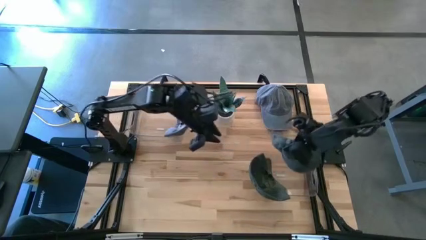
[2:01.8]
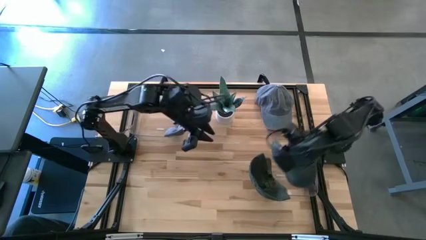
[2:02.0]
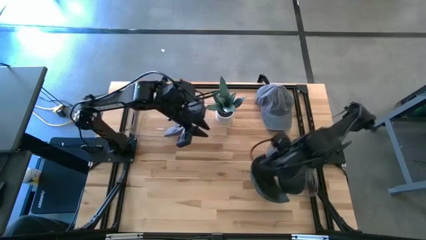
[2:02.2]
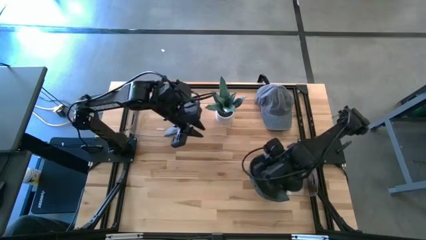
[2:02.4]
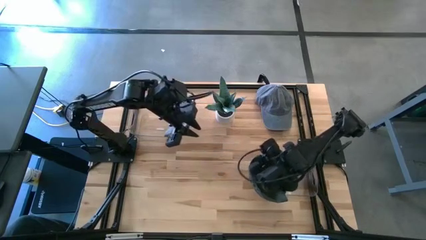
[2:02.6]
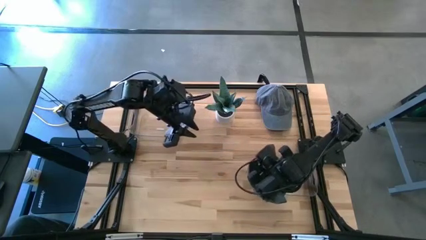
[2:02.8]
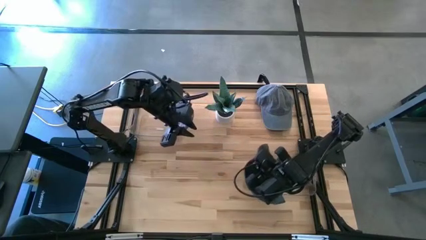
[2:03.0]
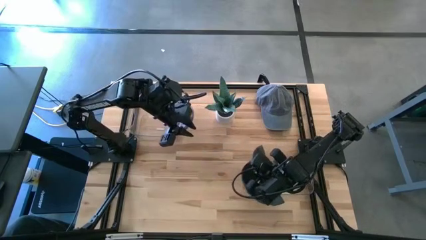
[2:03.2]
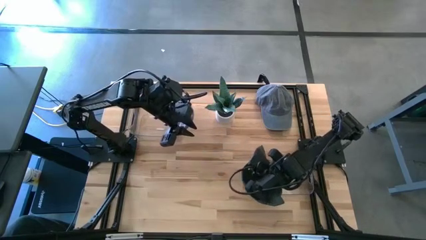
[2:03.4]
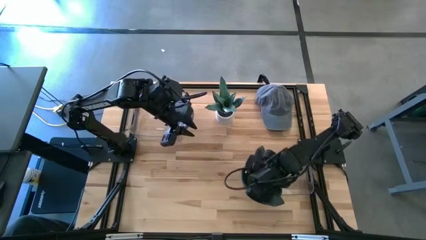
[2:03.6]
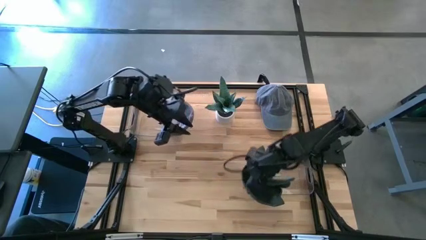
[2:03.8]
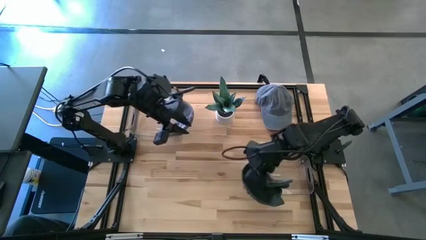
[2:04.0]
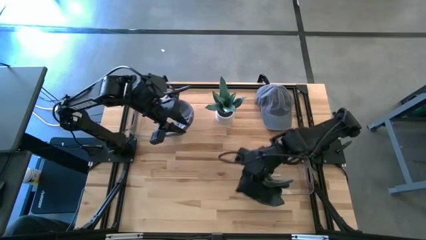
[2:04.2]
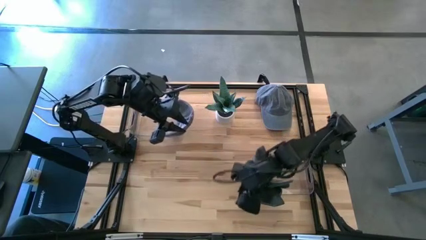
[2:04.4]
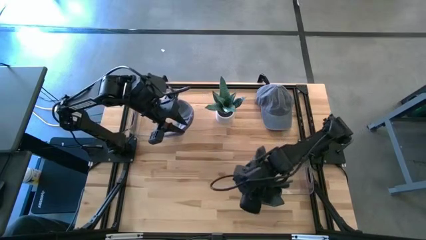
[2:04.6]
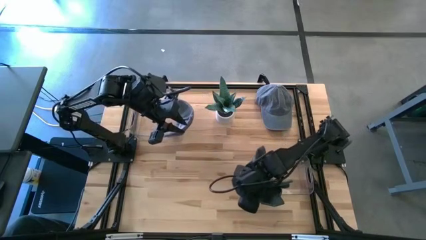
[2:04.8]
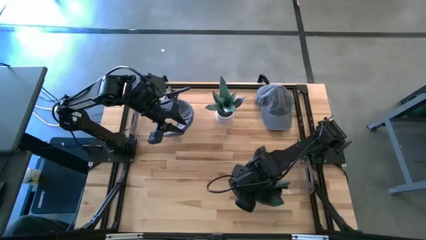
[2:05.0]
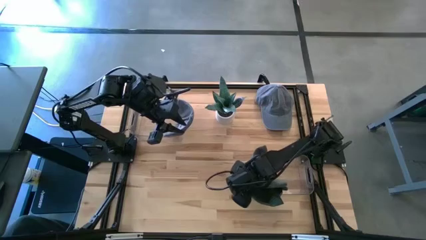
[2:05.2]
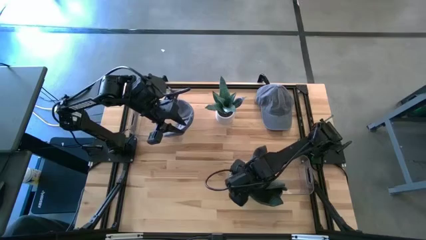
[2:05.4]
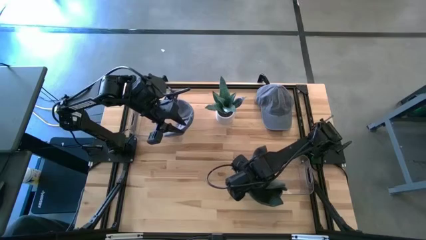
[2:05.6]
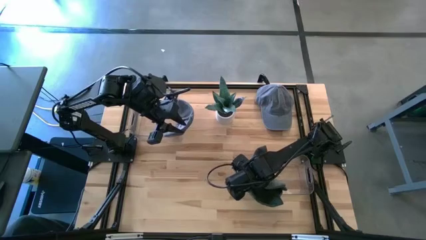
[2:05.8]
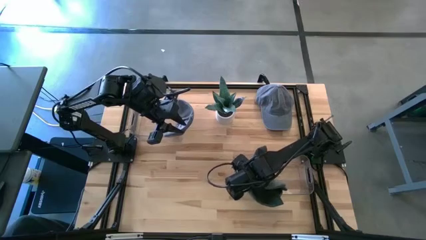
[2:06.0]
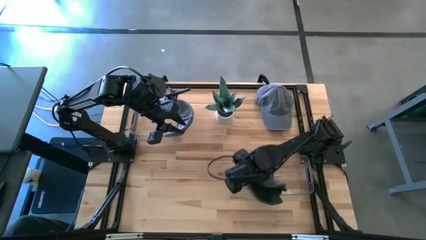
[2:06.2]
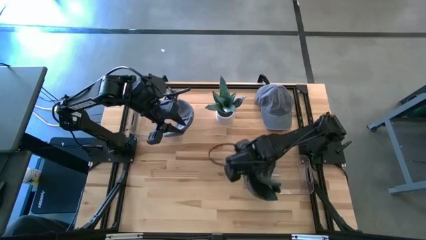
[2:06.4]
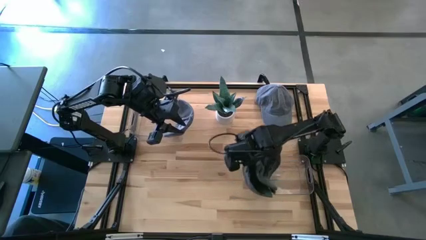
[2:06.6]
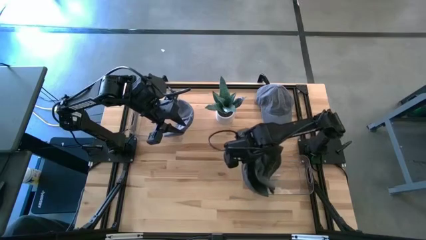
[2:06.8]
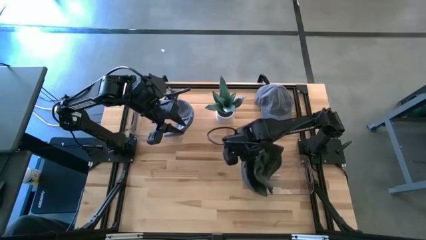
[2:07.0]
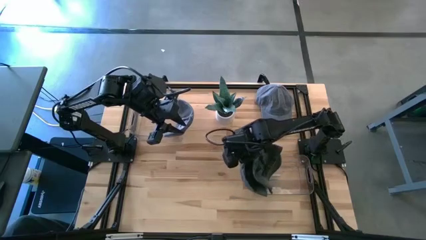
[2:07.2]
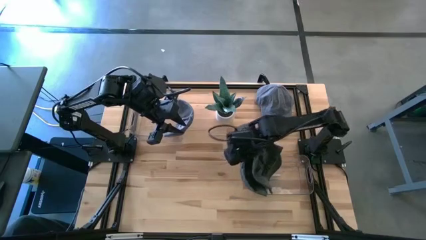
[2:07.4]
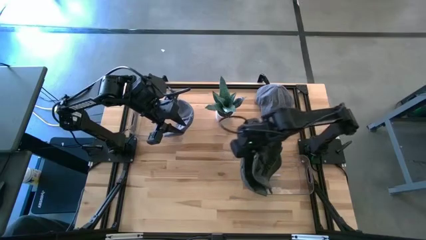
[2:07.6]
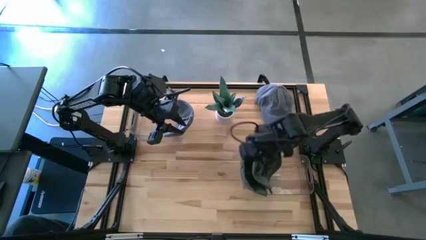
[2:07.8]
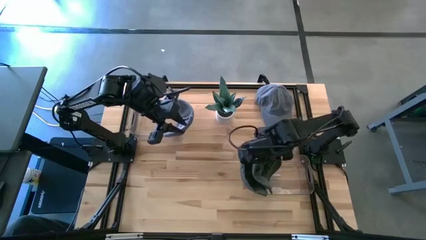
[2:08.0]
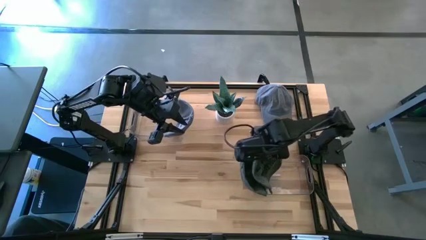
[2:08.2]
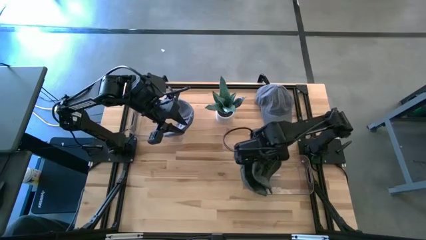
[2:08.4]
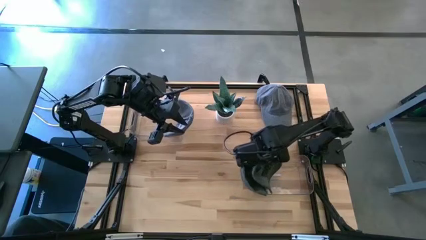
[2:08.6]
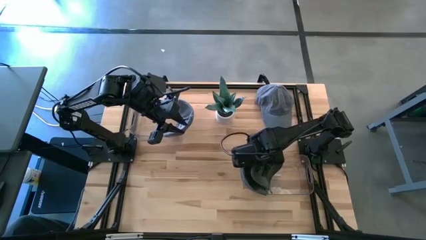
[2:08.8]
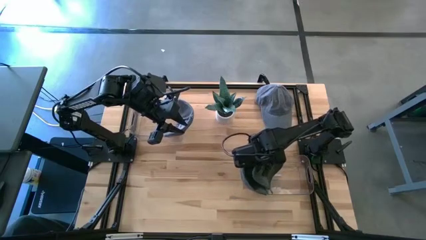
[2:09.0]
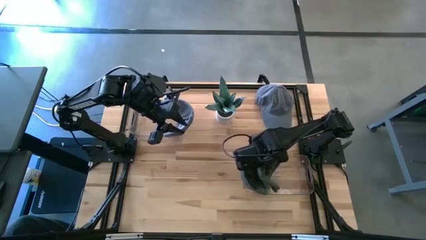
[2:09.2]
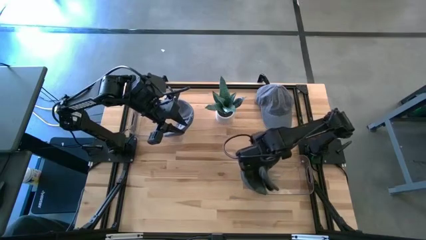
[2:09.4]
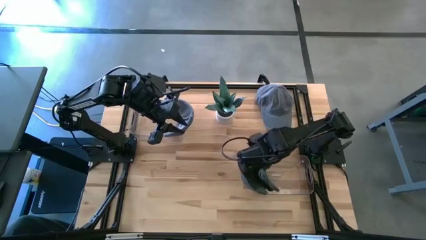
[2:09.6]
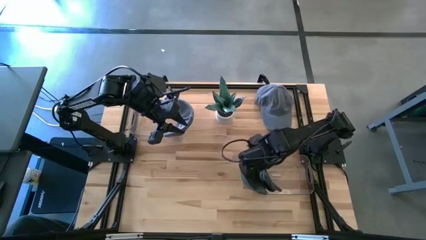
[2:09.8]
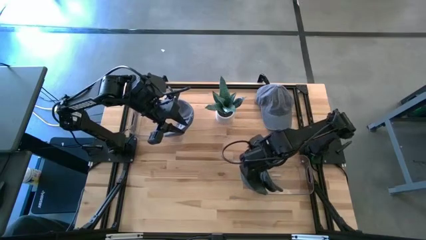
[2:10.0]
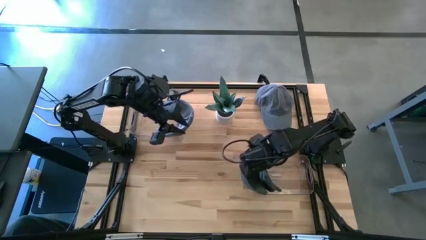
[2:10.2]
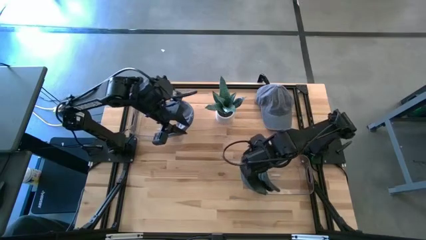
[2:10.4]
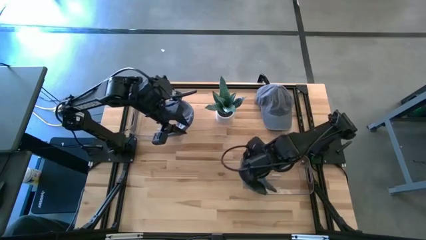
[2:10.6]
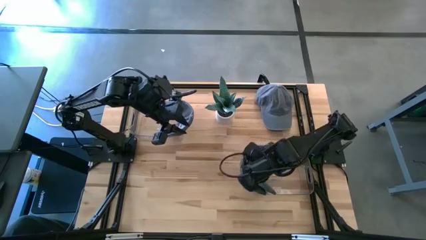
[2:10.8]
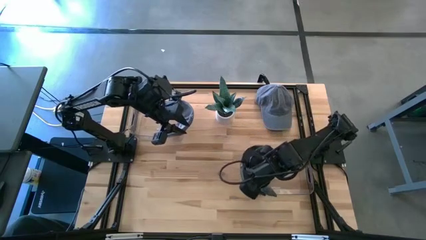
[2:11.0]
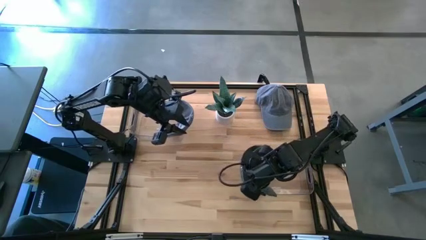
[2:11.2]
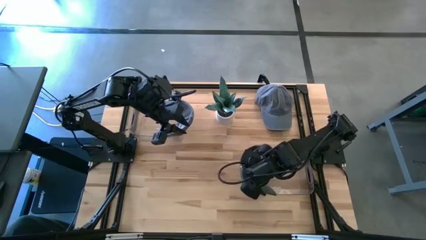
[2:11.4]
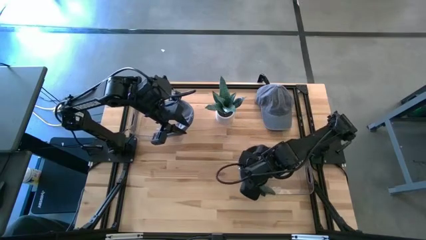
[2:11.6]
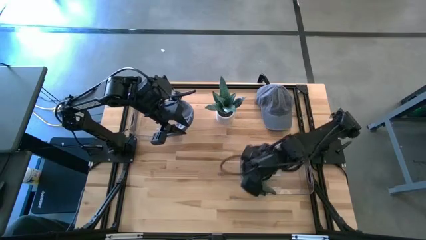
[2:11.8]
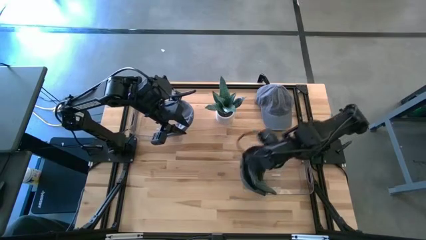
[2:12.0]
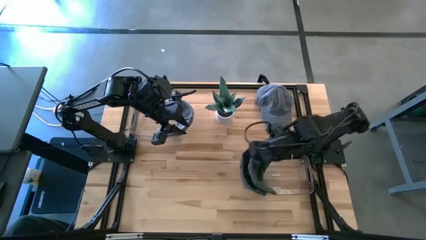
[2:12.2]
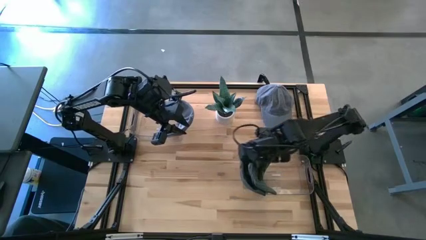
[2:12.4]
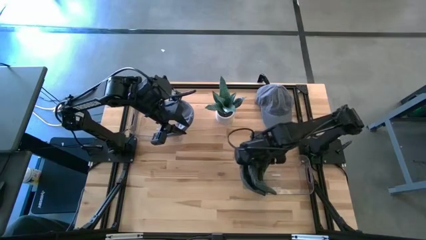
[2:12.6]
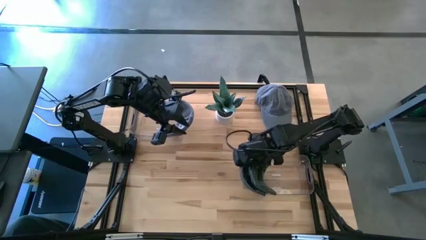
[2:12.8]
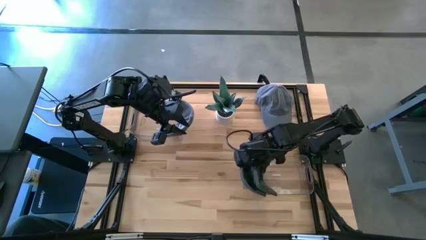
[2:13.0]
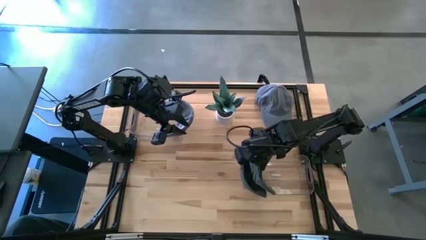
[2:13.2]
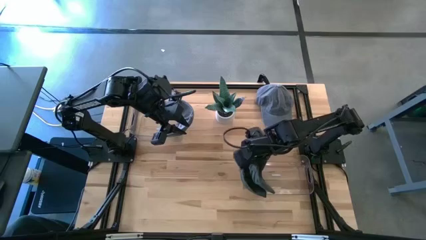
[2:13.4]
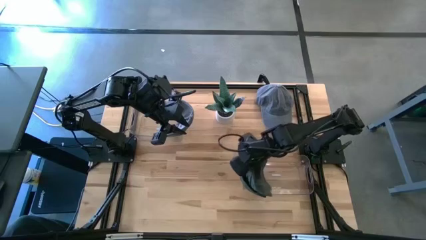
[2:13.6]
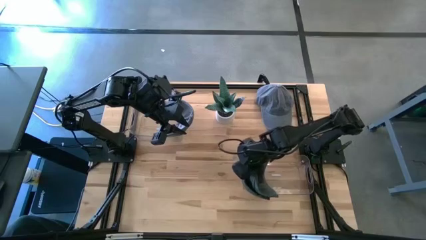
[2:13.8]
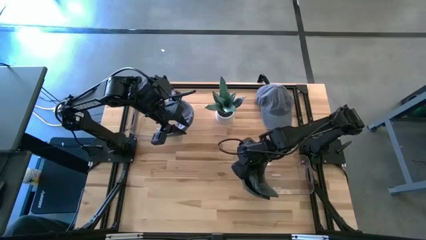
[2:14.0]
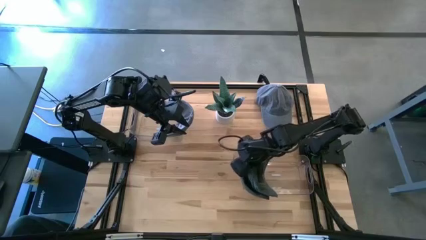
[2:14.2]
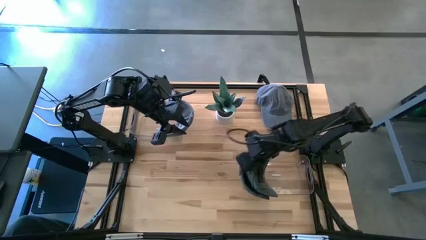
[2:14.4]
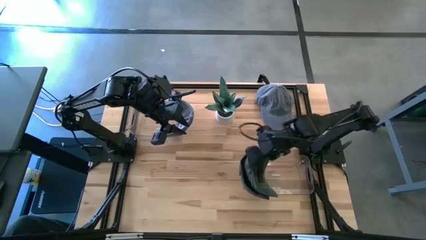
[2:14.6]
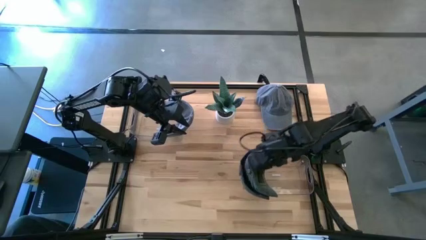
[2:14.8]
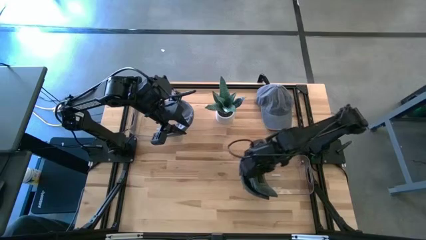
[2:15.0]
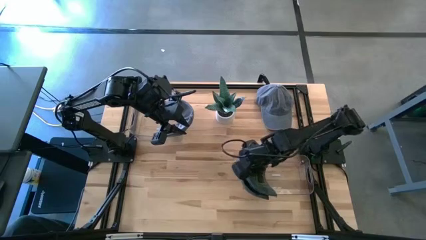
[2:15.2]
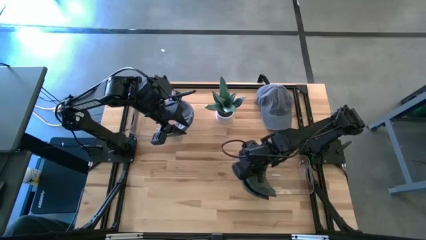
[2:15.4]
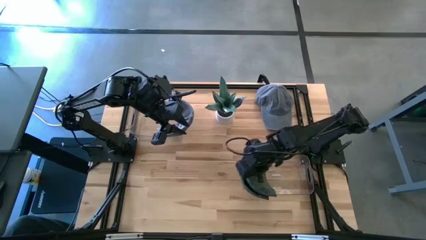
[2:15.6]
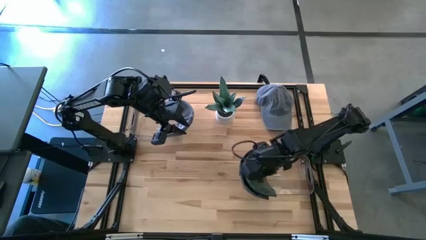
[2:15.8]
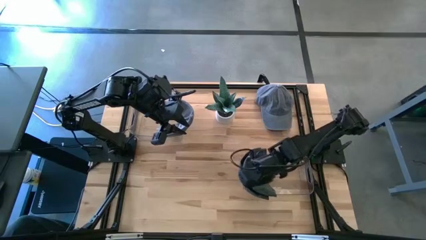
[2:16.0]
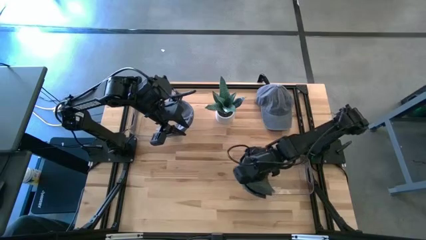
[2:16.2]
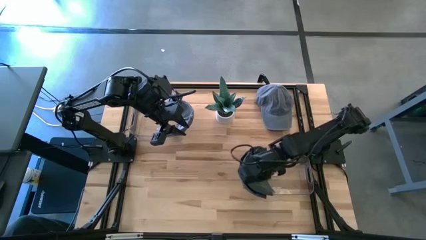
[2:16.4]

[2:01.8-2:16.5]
Task: Pick & Place hat
Put the black cap into the right transparent bin

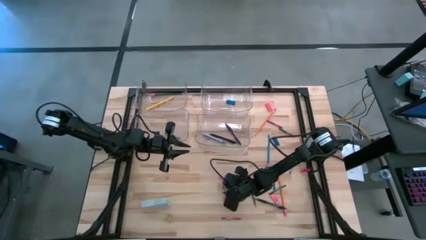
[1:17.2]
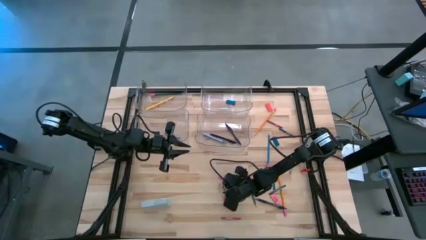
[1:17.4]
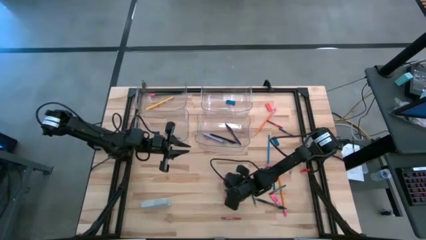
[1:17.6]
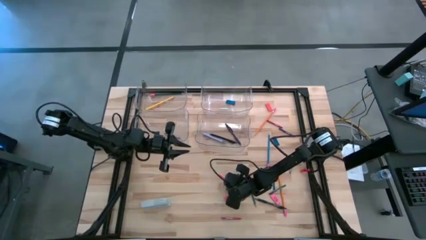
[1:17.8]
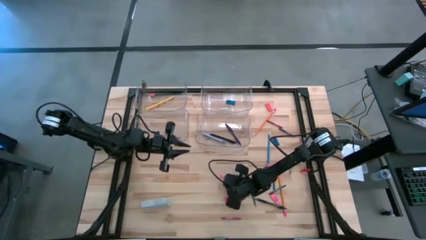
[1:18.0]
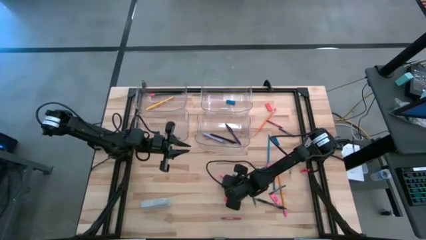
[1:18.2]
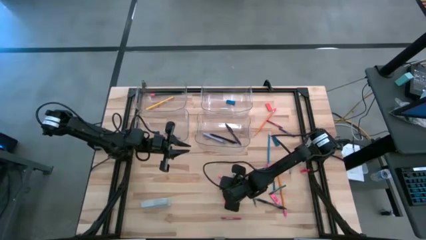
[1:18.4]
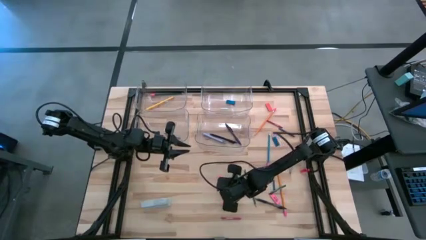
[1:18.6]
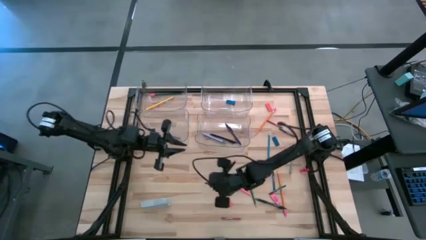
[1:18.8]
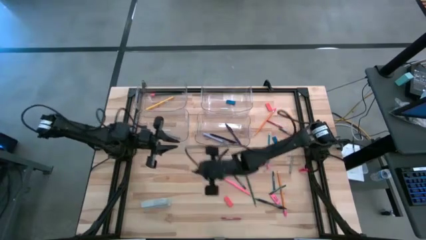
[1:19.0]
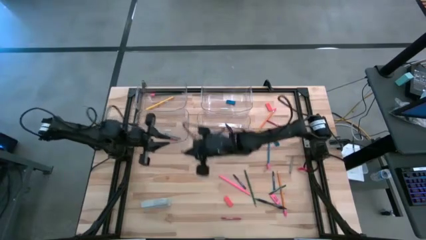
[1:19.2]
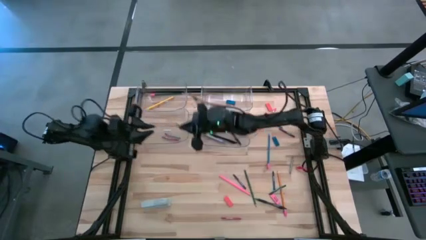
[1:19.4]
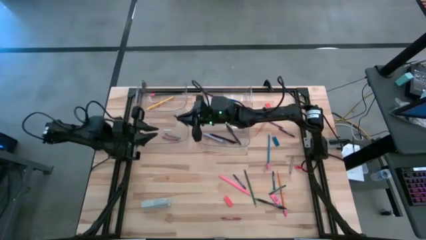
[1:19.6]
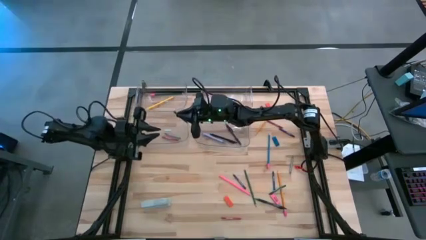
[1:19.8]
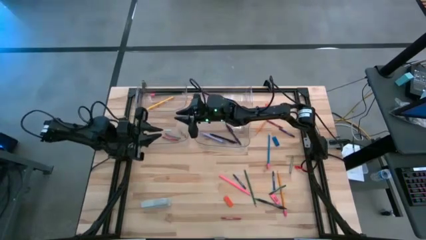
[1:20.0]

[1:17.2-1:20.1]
Task: Sort crayons/erasers/pens/pencils in bins
Put the left green crayon into the bottom left transparent bin
